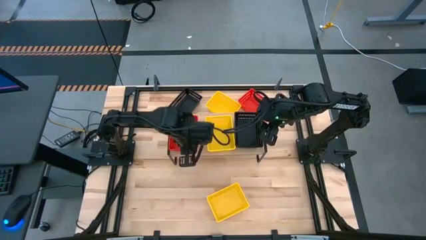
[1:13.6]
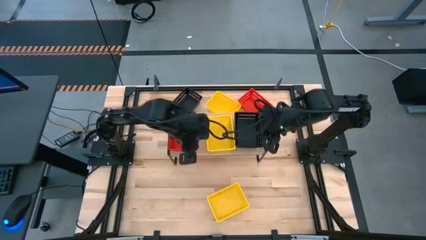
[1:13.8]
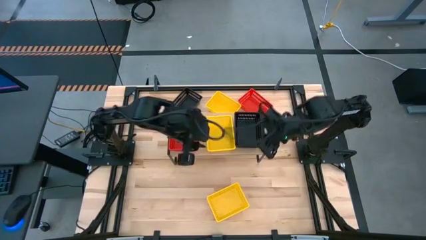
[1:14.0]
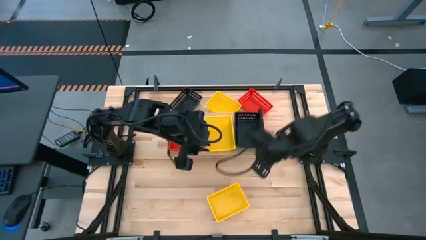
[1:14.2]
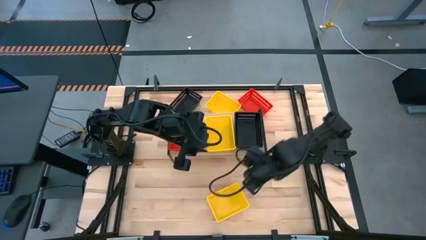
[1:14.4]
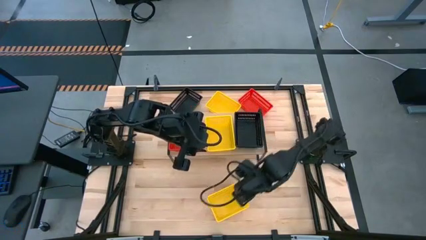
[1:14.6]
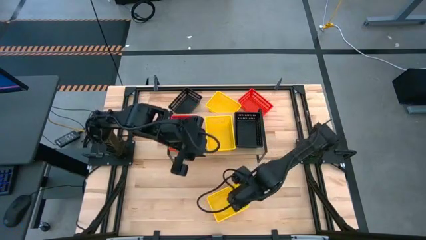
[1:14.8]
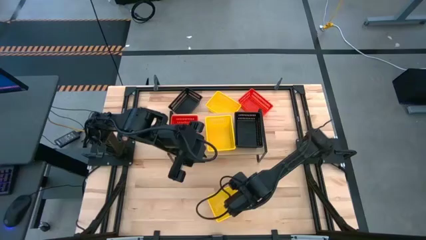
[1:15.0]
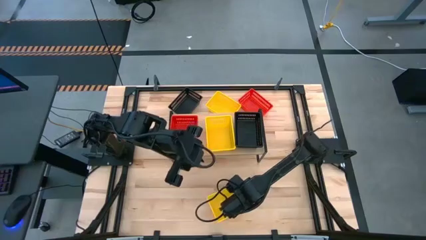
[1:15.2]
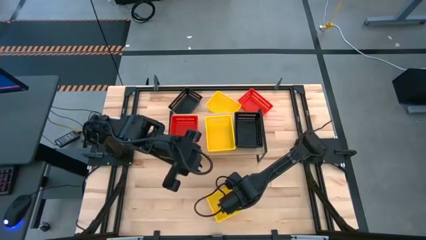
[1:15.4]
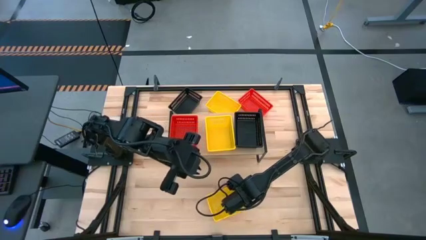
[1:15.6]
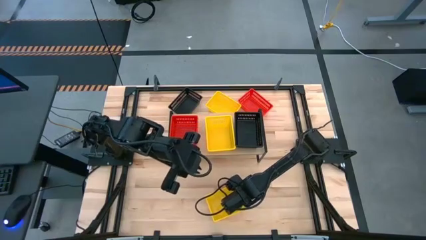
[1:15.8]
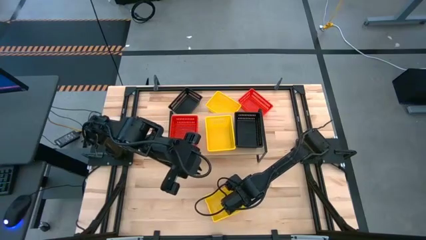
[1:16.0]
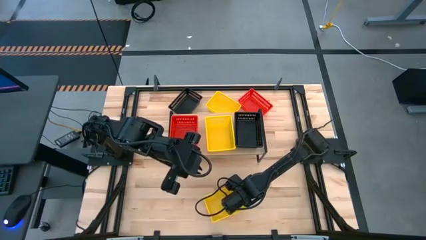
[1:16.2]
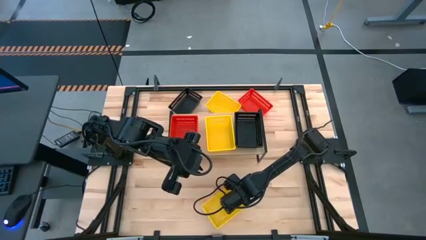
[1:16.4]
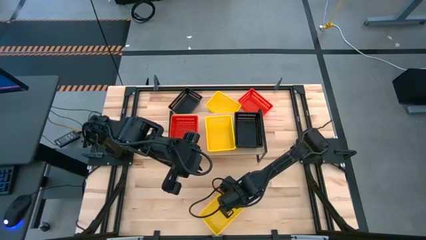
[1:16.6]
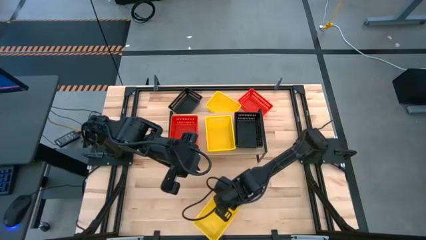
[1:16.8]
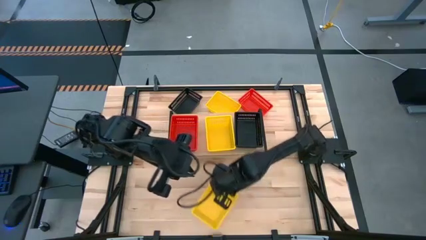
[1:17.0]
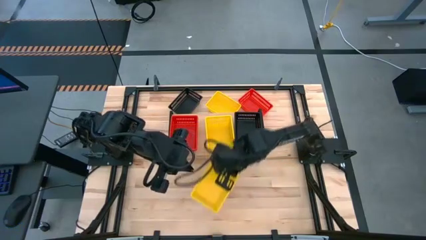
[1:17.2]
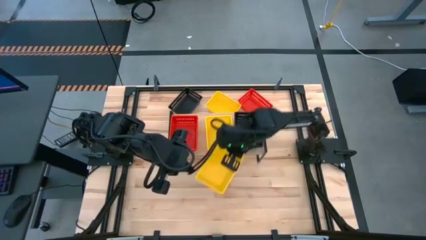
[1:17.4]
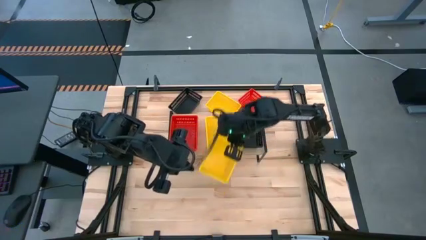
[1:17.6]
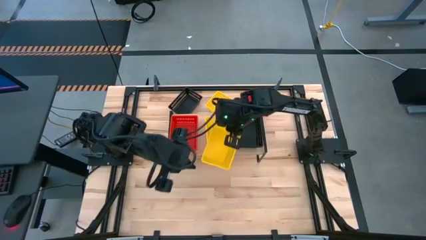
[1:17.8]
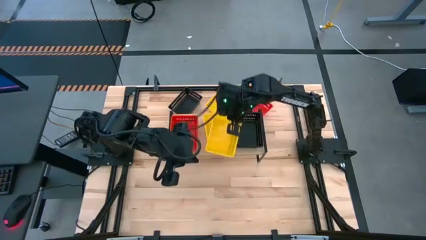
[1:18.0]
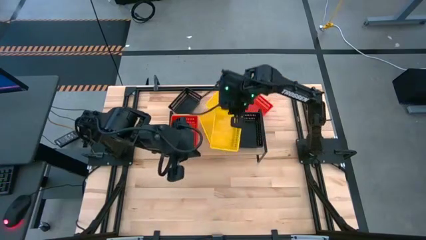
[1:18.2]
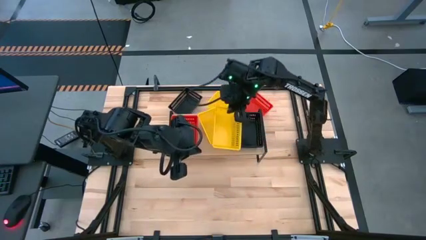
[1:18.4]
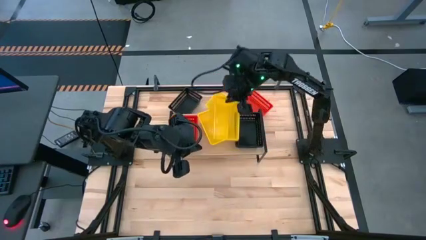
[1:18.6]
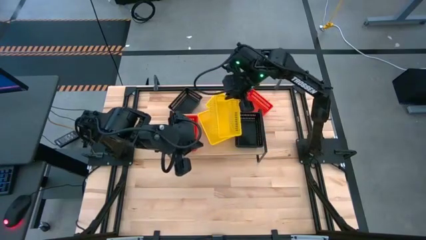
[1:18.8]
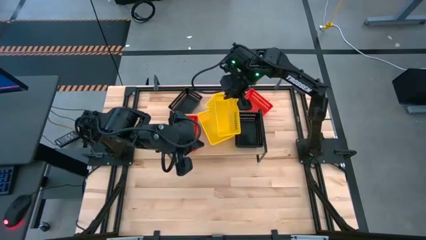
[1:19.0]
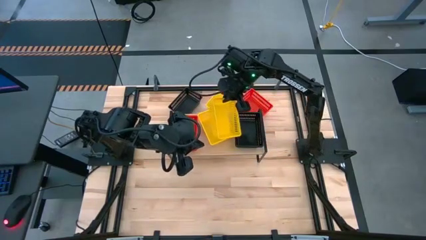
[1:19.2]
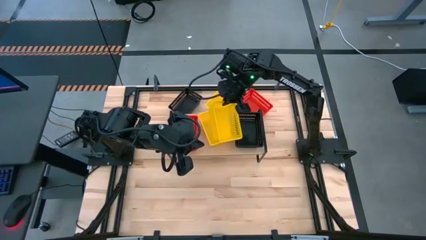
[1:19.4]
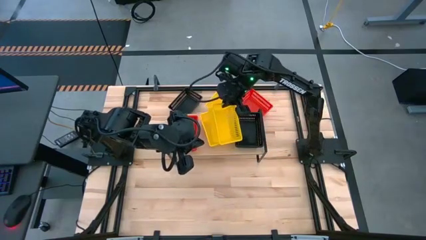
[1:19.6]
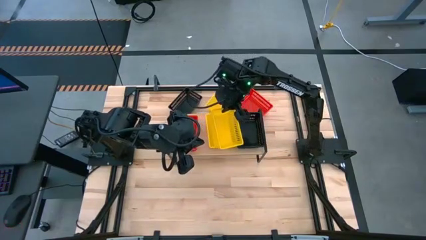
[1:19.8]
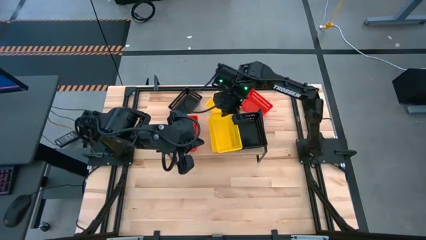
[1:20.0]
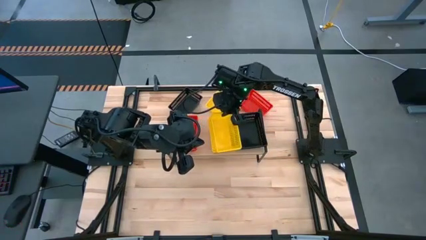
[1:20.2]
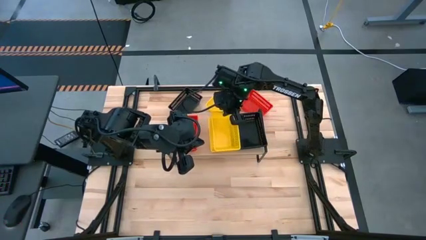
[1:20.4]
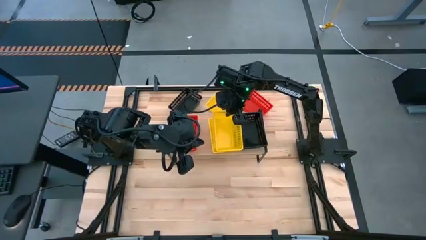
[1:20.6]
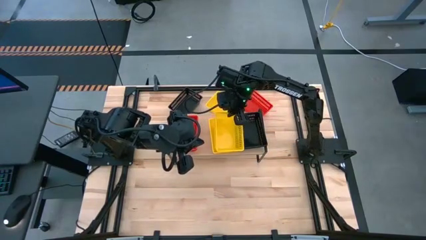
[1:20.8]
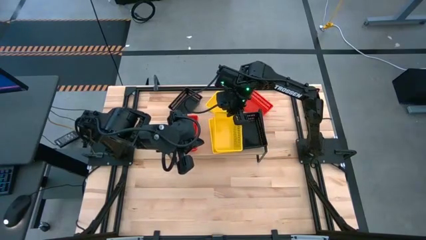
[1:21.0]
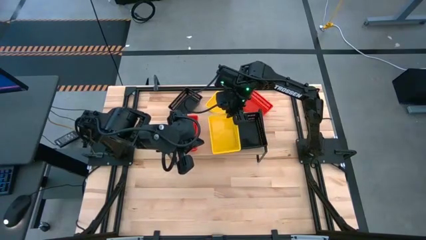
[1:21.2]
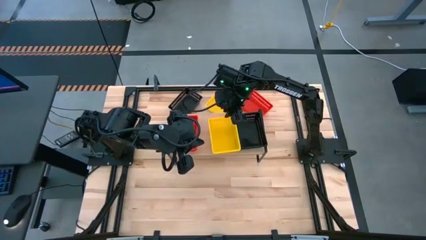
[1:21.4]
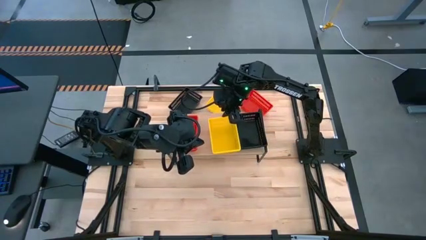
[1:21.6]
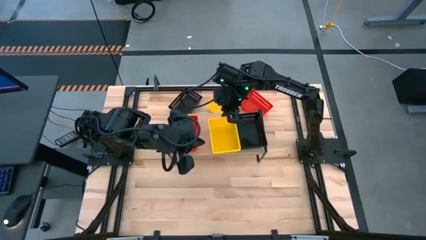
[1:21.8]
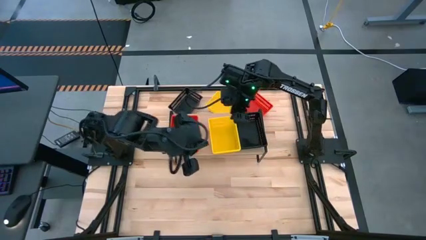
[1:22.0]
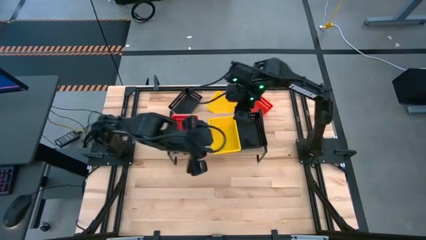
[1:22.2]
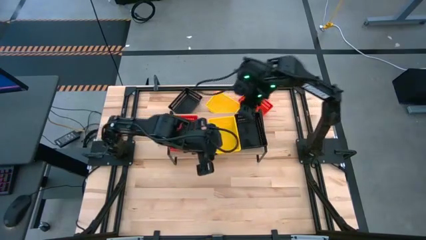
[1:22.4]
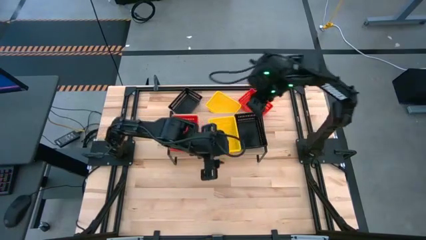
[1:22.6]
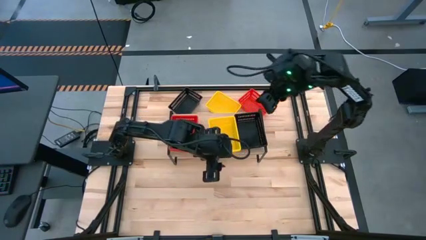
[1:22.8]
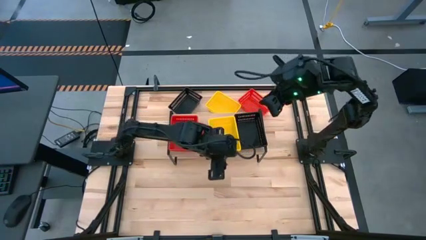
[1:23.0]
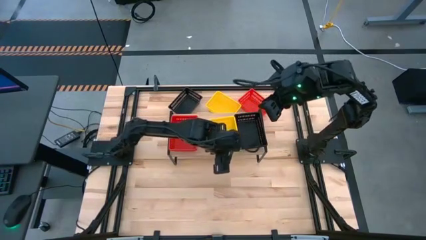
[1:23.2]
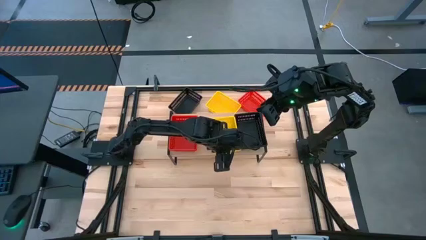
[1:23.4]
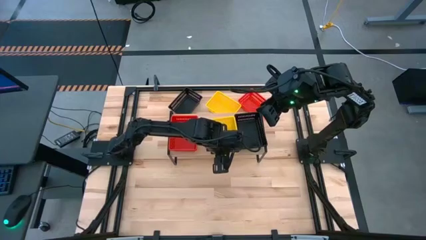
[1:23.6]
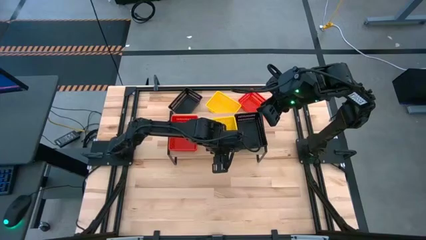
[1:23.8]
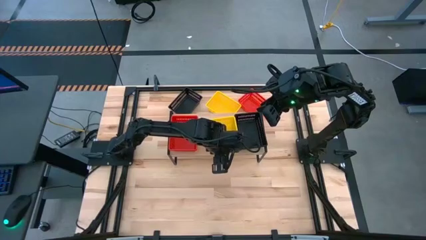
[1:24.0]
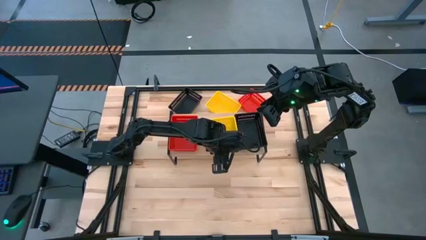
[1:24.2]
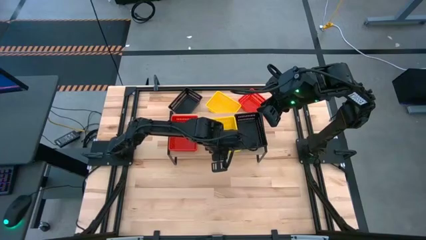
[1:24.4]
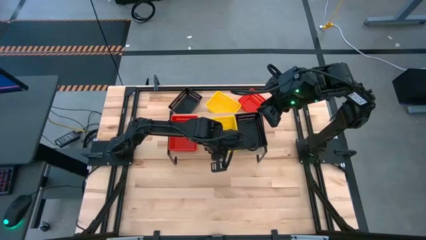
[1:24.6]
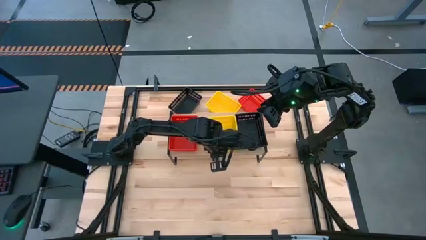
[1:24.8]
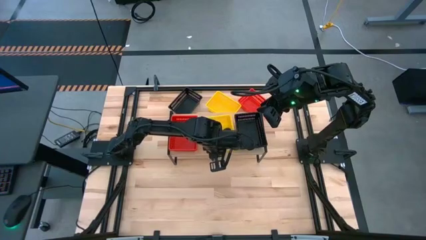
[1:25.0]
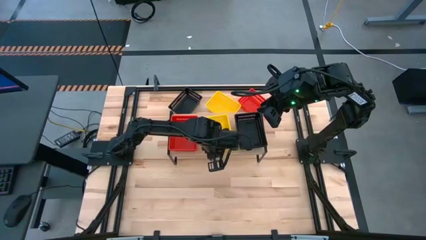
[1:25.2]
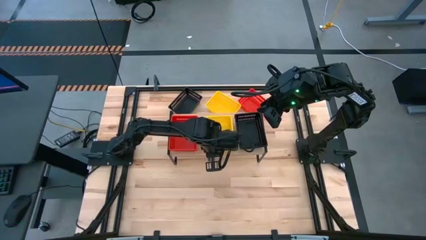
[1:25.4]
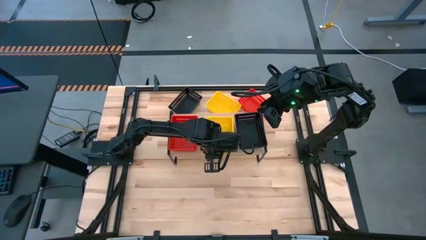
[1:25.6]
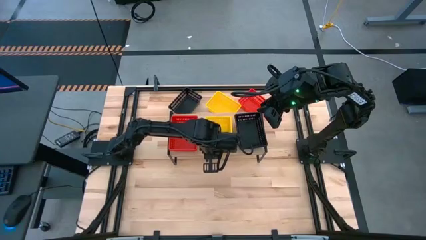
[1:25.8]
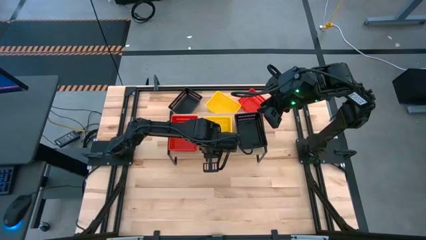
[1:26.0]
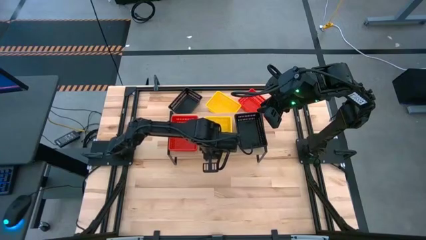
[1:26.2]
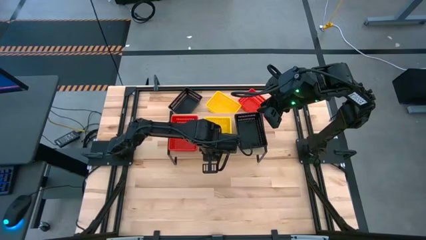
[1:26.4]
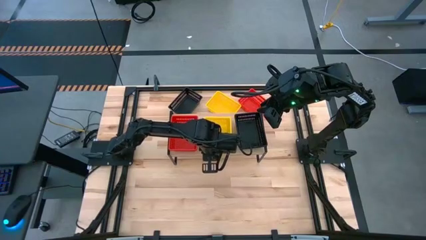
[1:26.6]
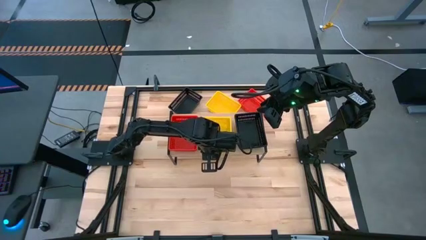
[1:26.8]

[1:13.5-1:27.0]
Task: Stack baskets on shelf by color
Stack the bottom yellow bin on top of the yellow bin on the shelf

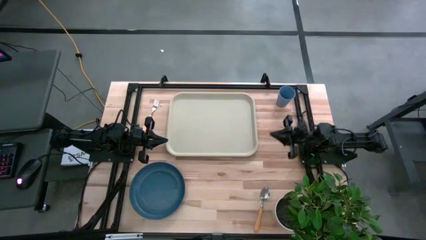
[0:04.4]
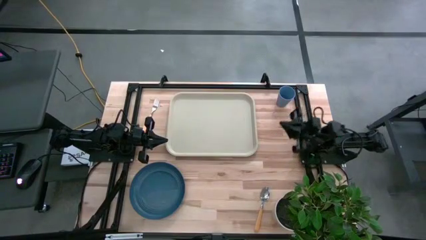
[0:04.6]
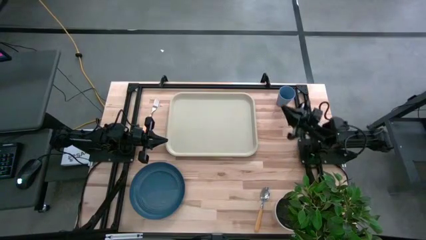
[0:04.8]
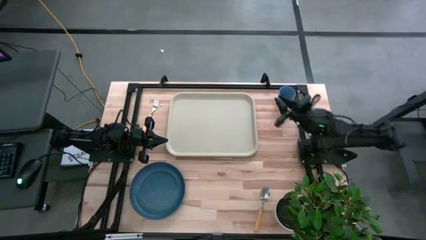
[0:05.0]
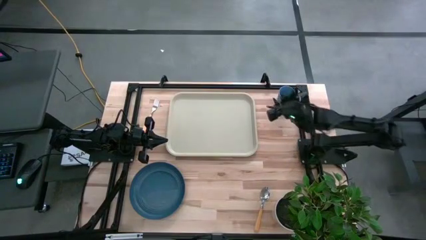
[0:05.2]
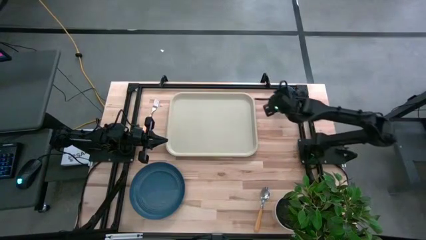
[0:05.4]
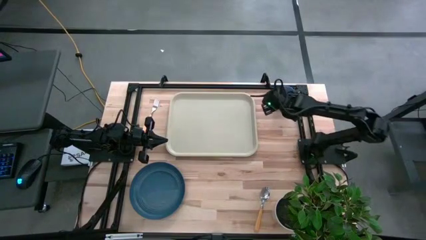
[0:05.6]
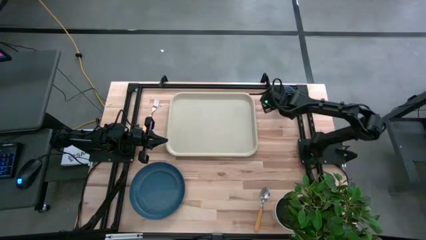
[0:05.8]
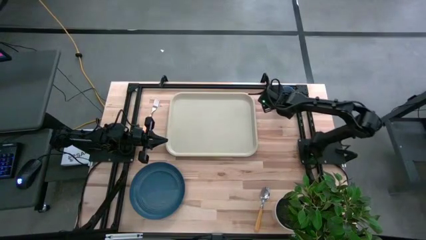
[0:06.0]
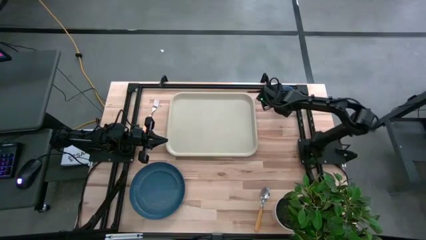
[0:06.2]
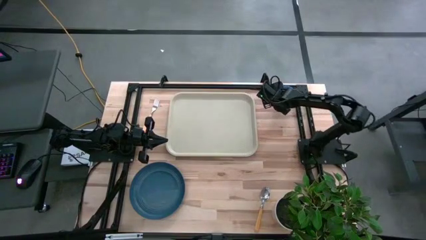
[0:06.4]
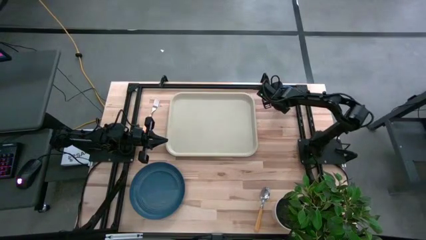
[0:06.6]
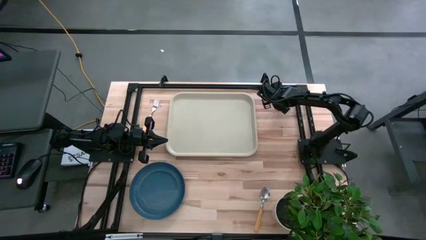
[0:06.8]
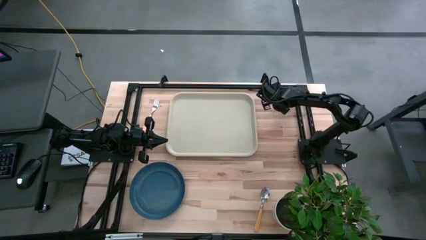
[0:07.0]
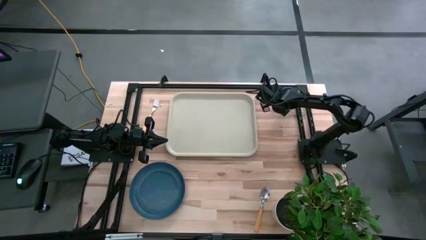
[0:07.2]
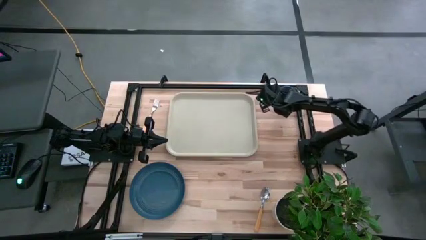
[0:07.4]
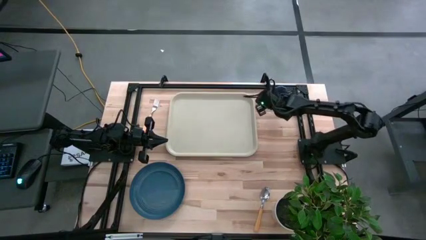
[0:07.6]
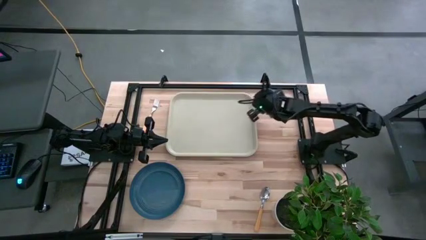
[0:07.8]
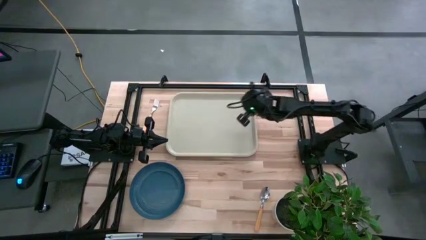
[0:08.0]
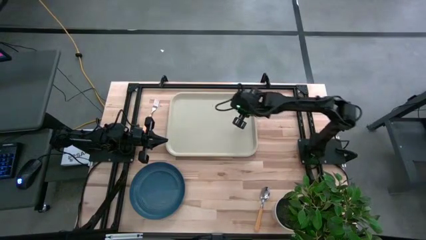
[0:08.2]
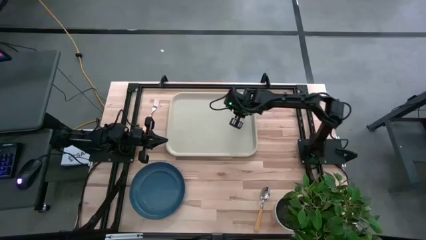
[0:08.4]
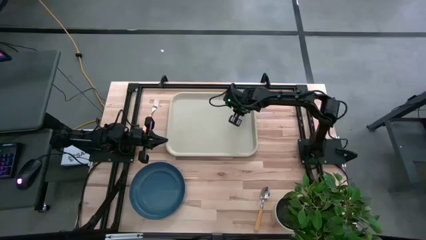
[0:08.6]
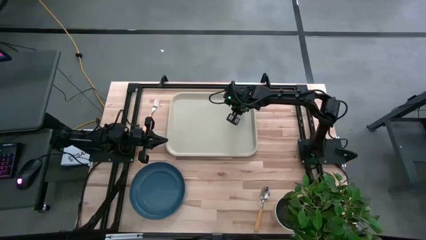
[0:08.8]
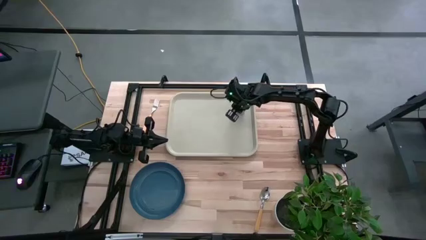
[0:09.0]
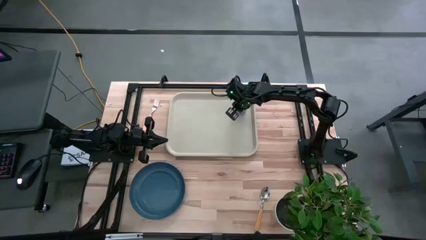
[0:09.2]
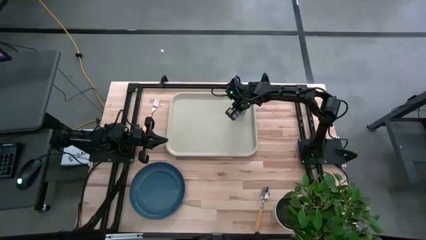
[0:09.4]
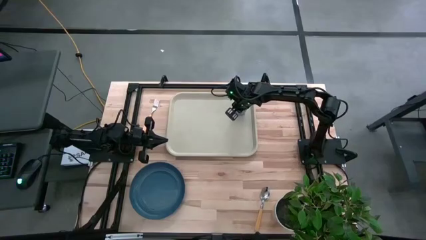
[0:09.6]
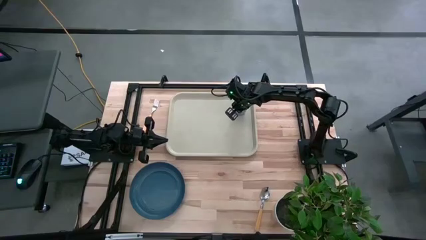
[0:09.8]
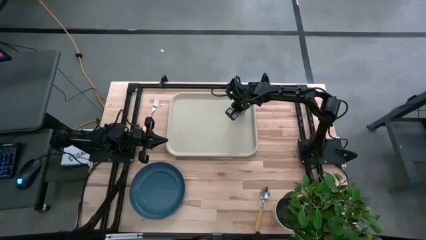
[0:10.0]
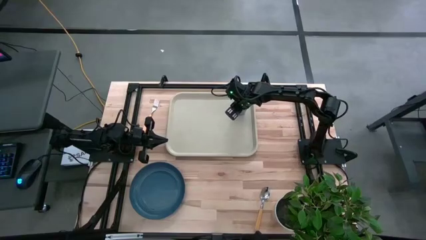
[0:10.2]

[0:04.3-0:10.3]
Task: Pick and place plate/cup/fork/spoon on tray
Put the blue cup on the top right of the white tray
